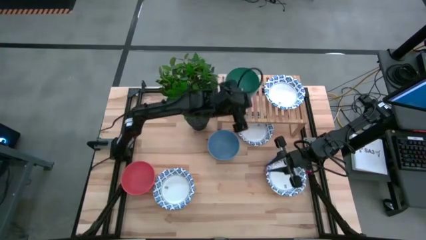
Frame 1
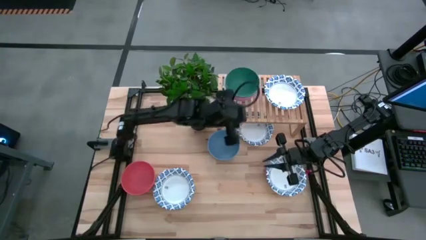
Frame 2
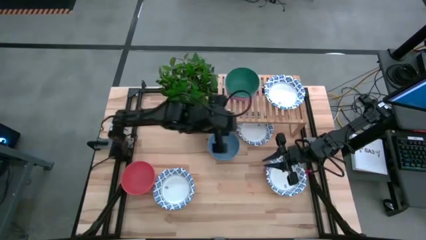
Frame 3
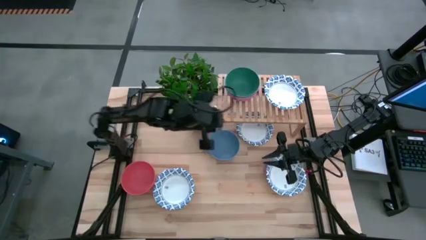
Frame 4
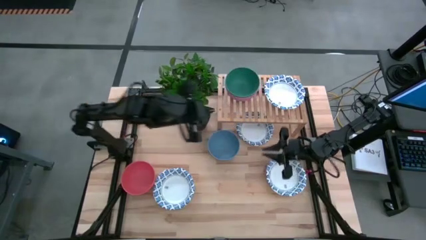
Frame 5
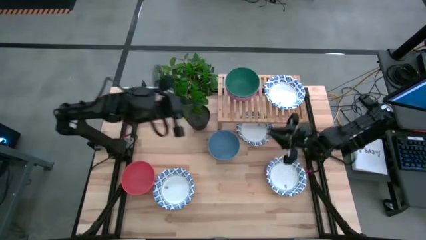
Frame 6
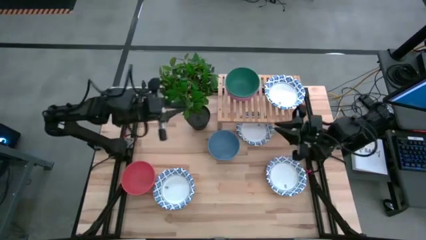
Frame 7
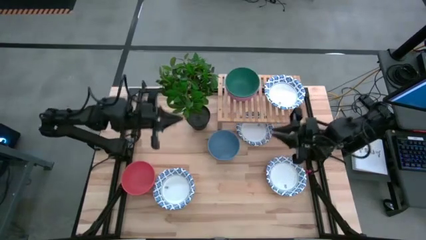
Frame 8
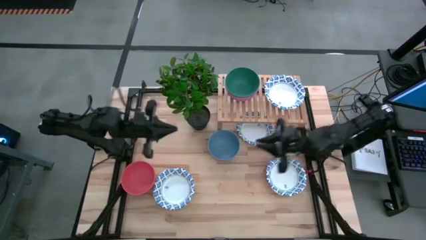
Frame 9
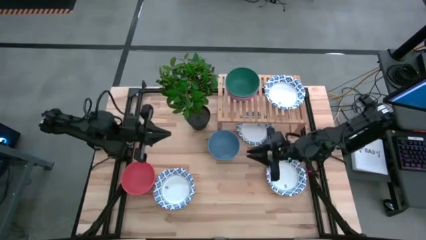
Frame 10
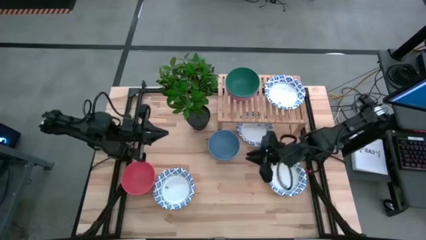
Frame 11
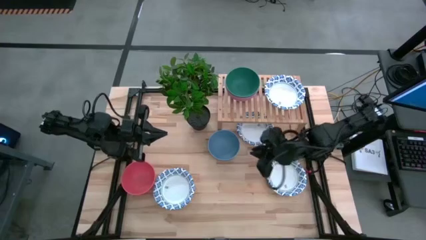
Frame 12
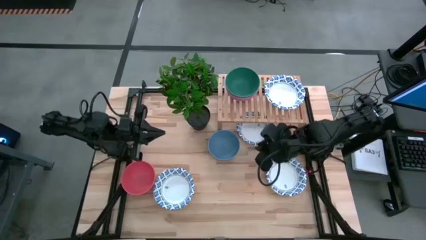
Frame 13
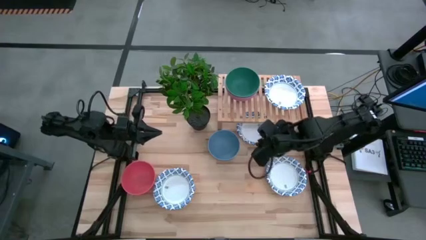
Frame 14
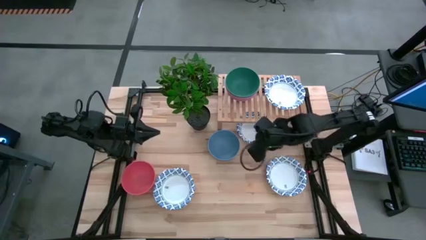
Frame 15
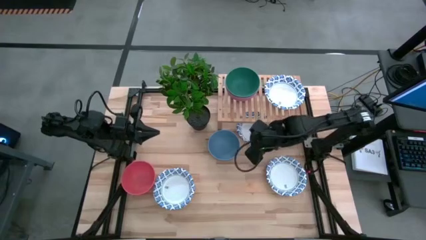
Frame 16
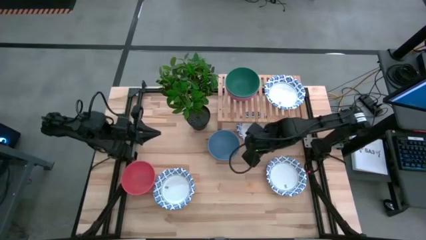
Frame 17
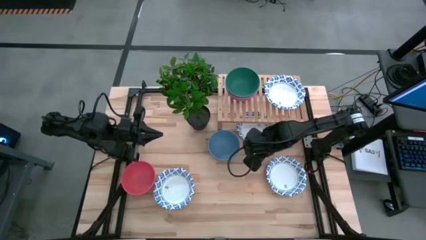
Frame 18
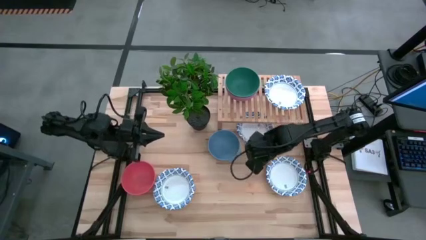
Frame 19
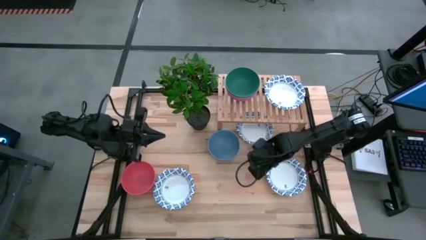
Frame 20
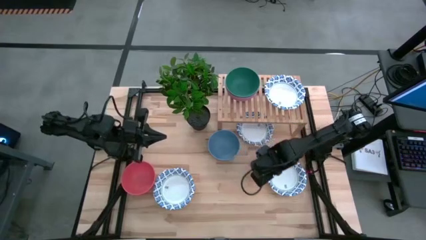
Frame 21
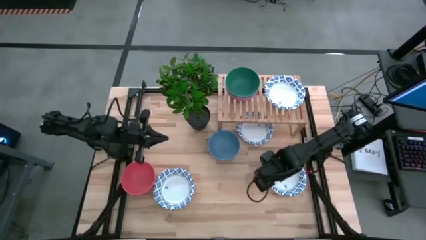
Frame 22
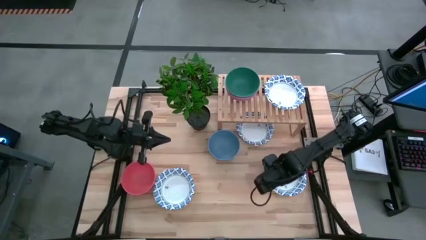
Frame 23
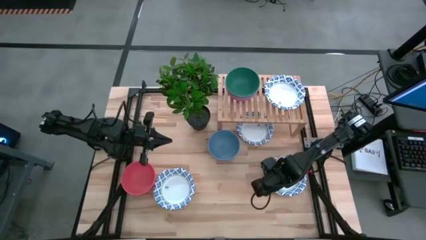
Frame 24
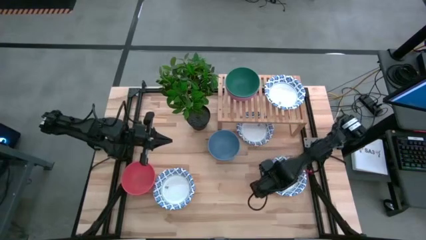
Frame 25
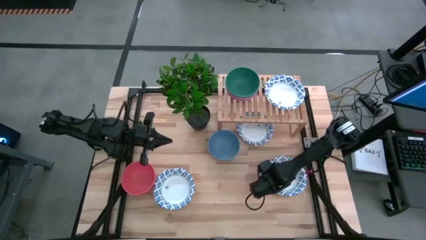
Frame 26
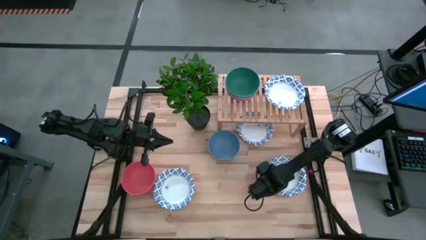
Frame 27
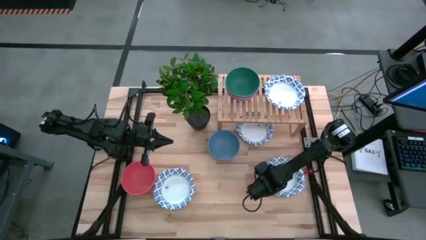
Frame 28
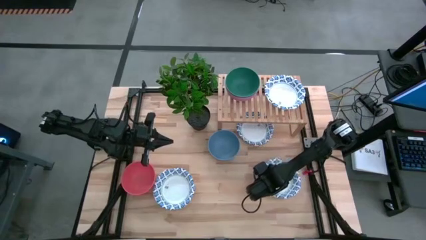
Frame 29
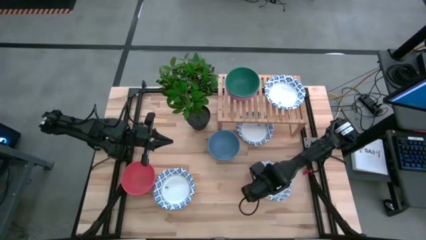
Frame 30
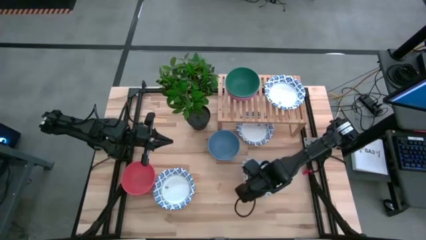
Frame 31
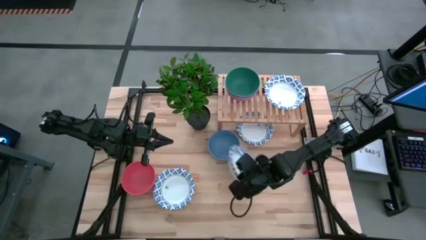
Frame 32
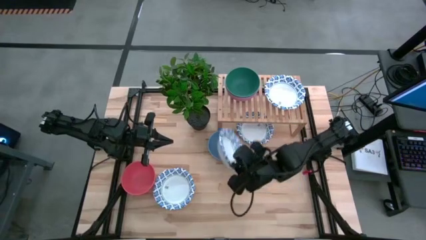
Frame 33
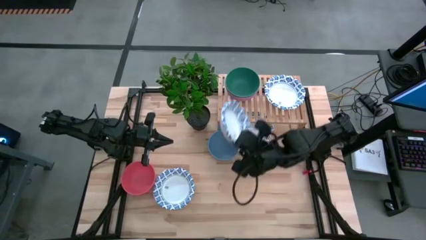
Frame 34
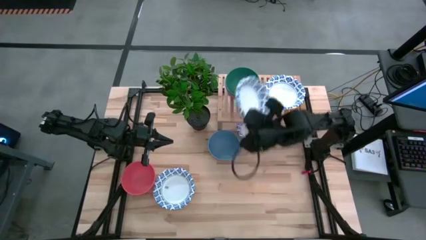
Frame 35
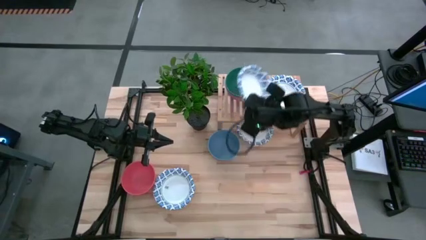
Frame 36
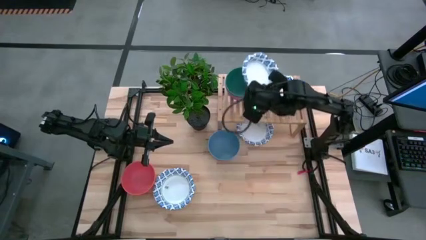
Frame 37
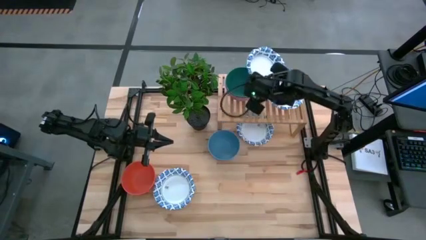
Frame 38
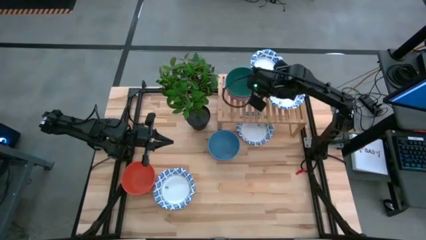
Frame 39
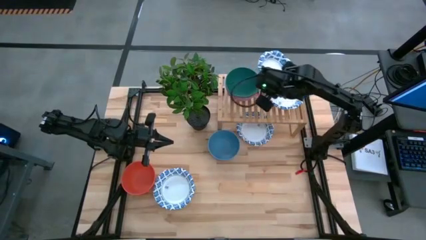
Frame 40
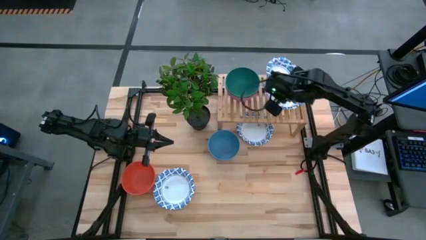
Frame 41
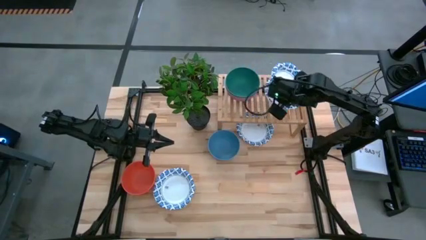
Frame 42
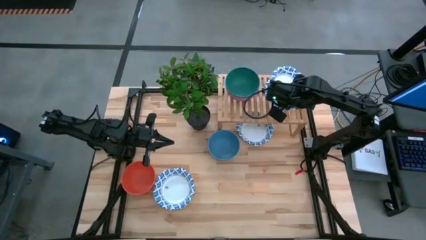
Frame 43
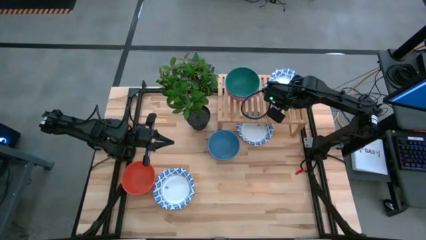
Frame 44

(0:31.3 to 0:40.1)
Task: Place and stack bowls onto a shelf
Stack the white patterned bowl on top of the other white patterned bowl on the shelf

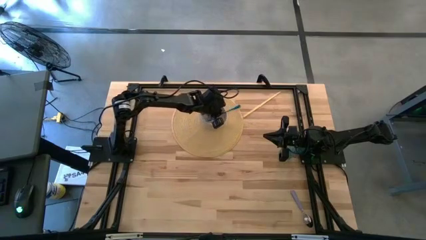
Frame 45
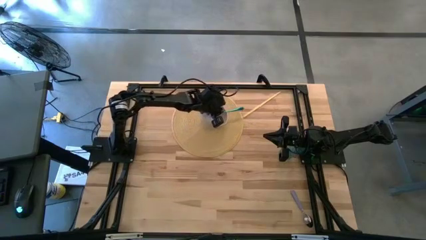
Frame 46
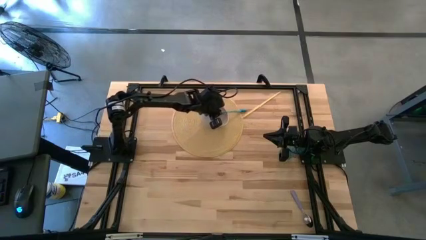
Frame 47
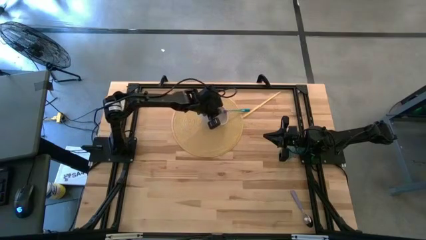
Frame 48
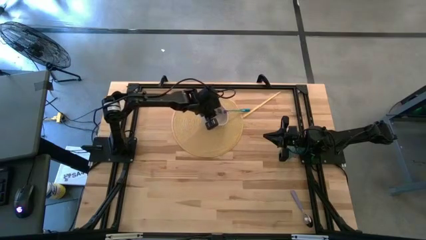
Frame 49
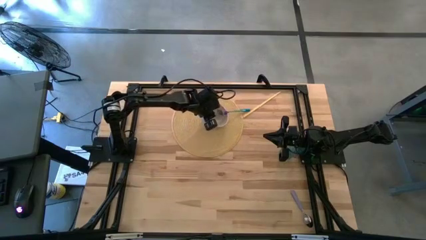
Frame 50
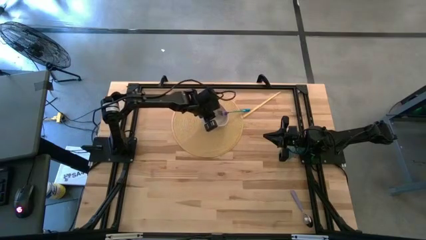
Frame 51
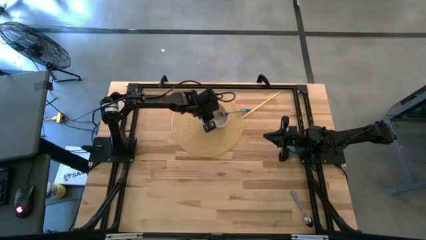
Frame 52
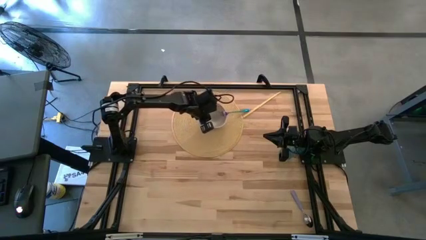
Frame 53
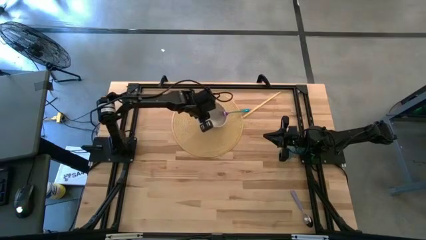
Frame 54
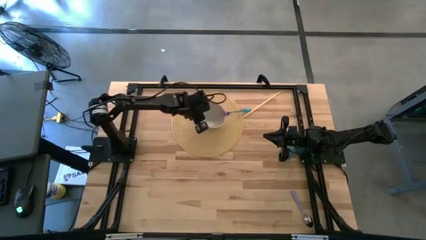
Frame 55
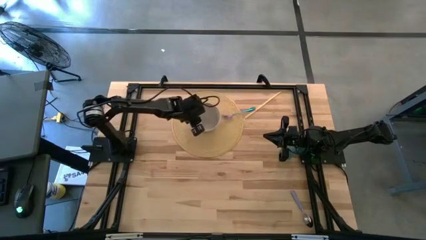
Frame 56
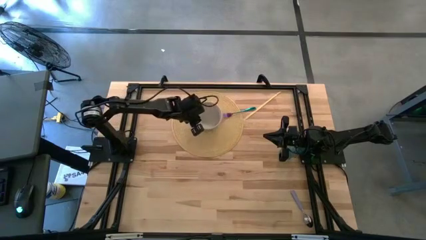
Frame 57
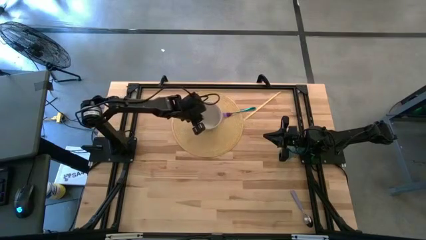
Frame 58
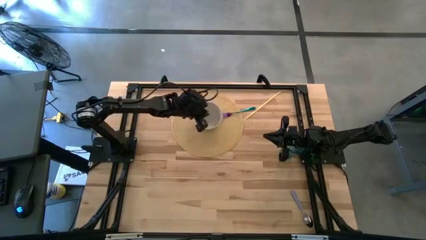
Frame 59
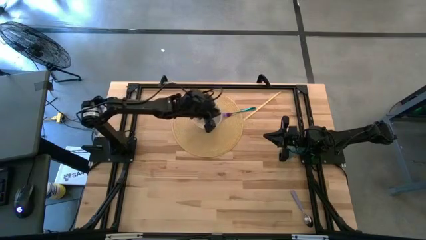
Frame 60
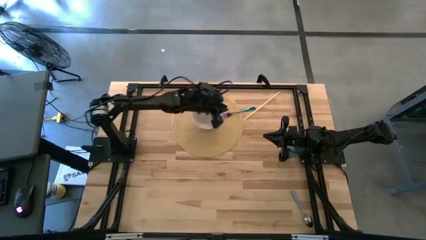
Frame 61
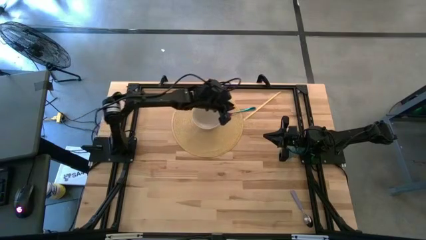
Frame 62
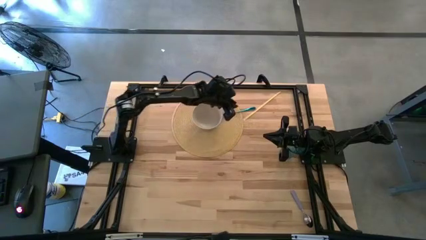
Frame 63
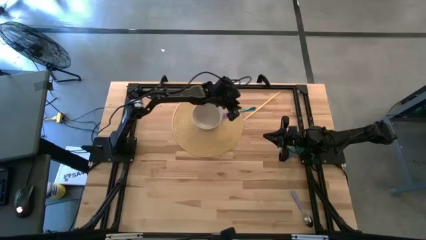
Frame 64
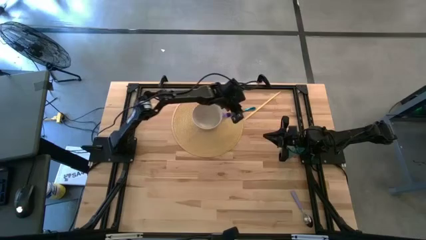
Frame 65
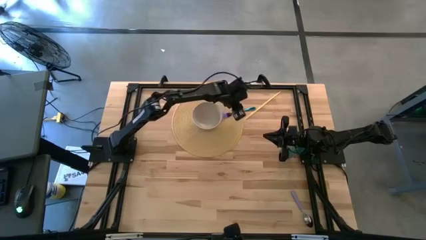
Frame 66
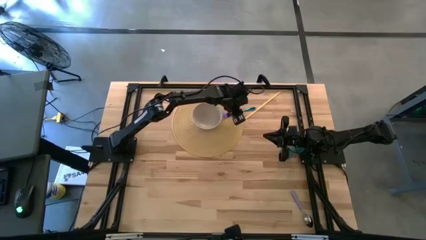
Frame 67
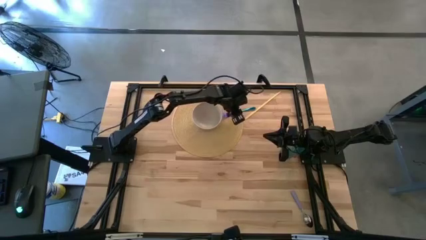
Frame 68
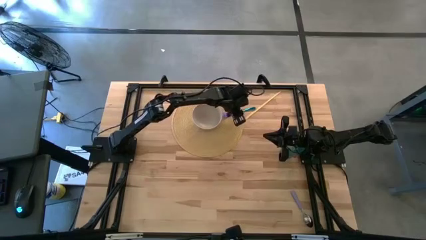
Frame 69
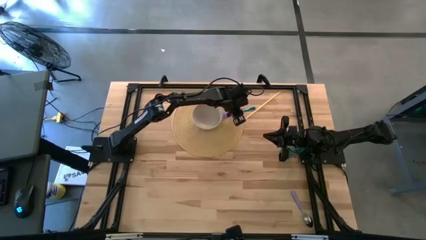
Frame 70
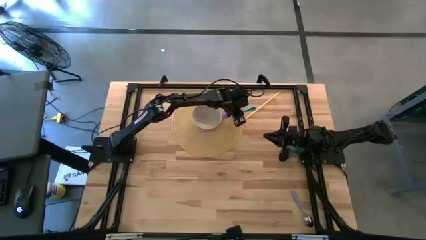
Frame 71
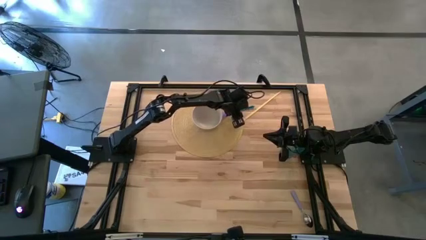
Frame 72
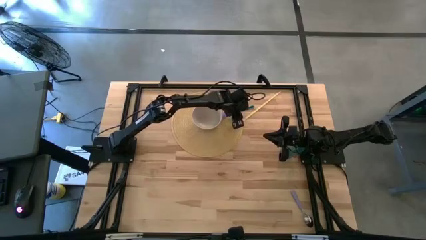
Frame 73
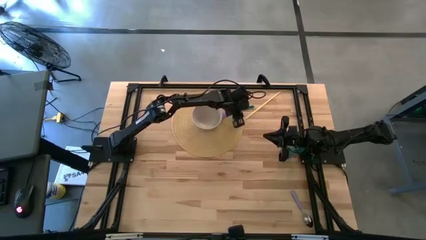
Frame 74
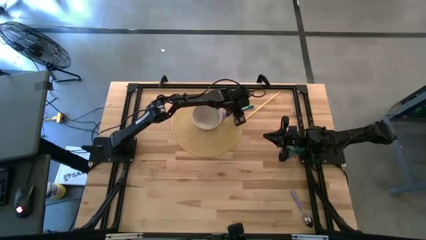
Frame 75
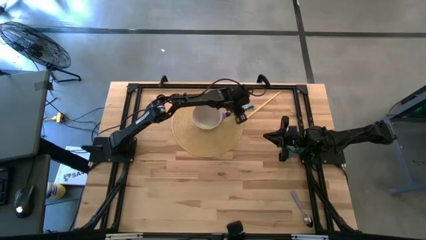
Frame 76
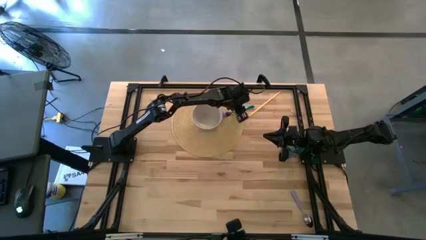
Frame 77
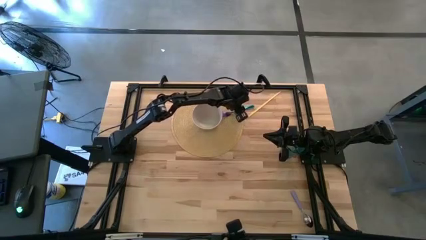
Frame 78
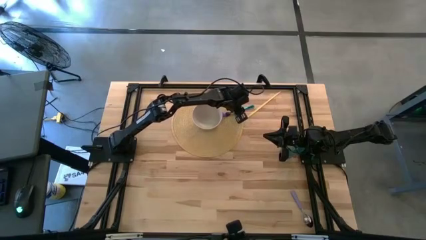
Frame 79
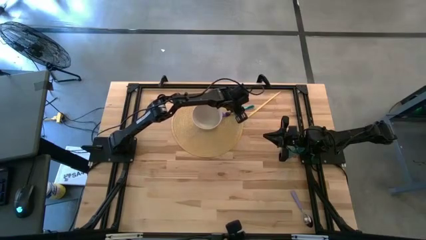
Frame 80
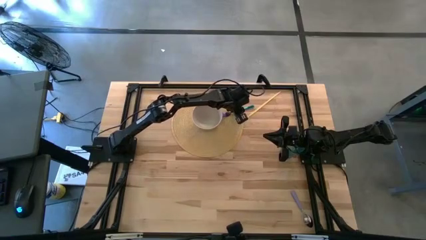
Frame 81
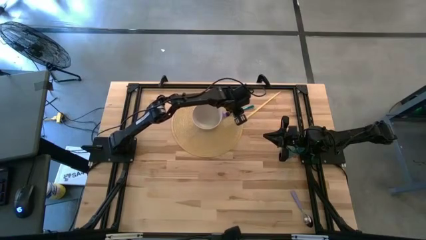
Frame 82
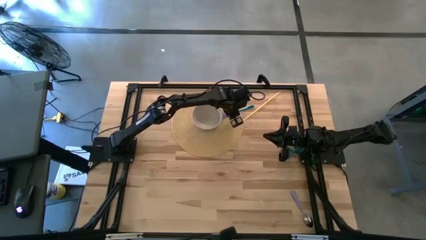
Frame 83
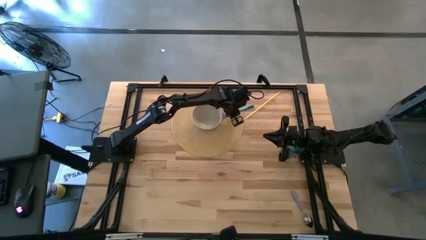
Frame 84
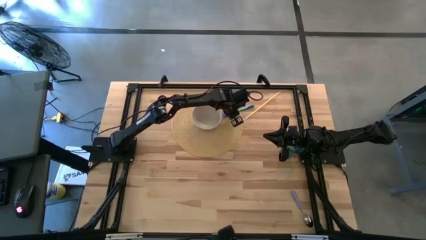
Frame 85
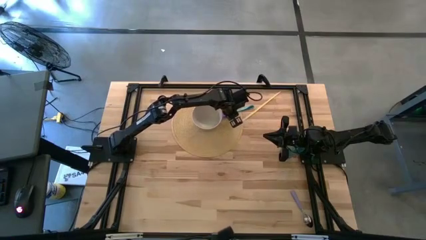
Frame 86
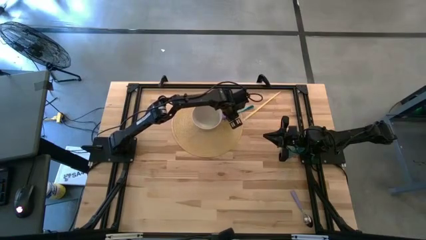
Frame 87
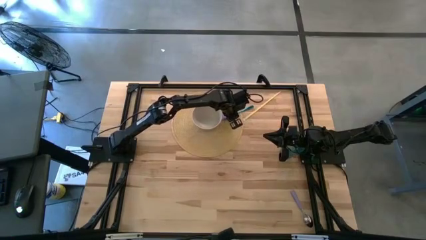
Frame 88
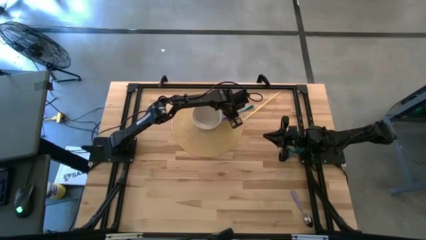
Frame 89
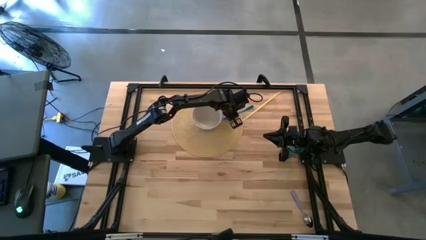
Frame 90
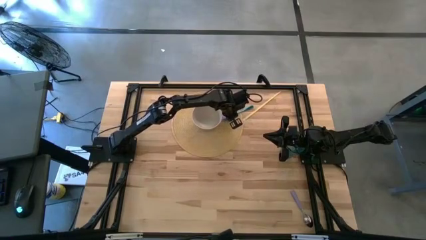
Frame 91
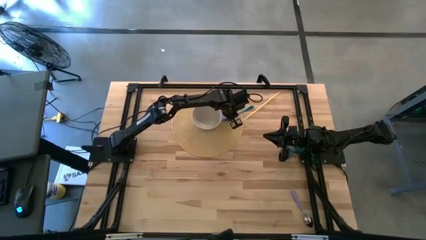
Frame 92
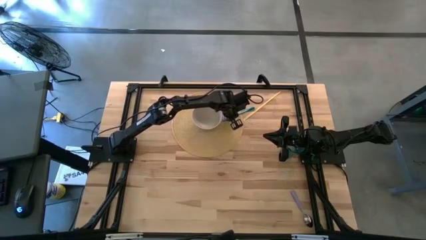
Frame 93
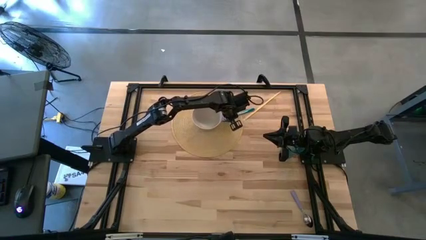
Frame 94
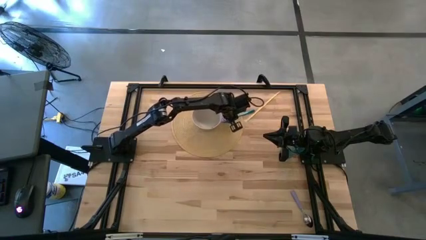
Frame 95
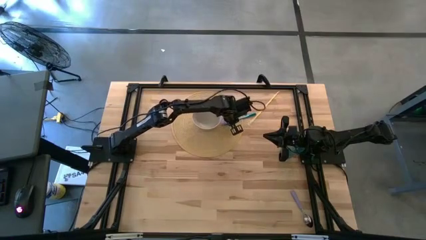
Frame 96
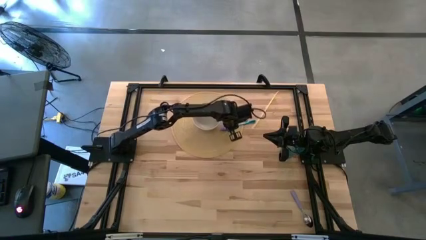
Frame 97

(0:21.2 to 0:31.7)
Task: Pick & Place Utensil
Put the blue fork into the white bowl
